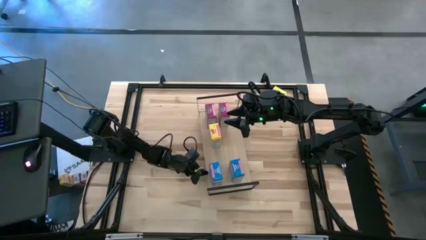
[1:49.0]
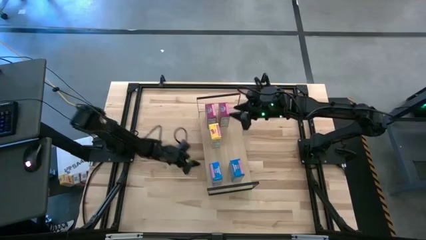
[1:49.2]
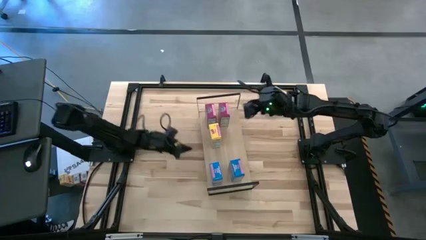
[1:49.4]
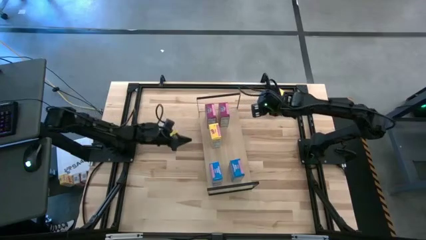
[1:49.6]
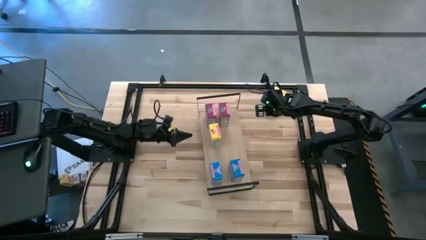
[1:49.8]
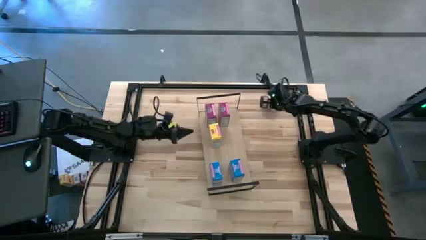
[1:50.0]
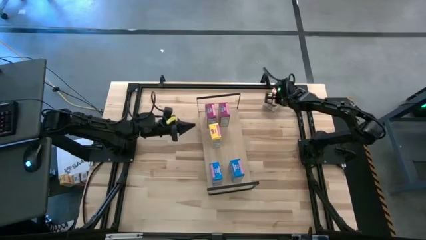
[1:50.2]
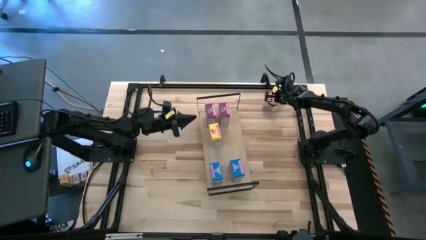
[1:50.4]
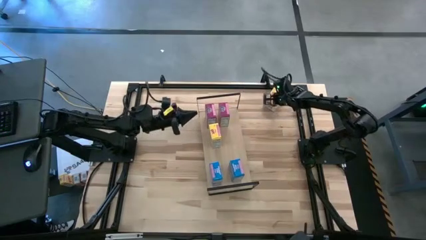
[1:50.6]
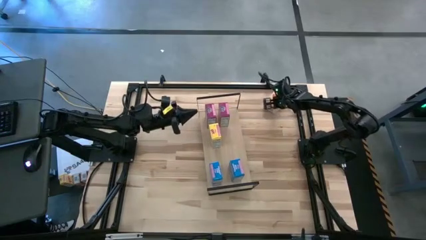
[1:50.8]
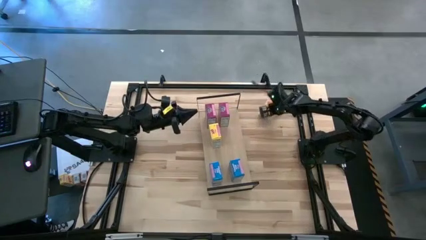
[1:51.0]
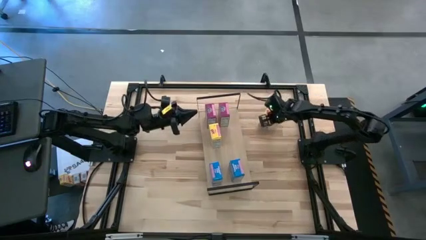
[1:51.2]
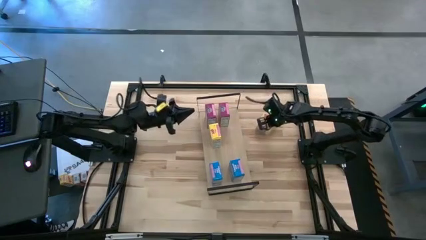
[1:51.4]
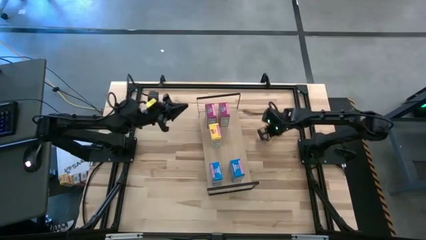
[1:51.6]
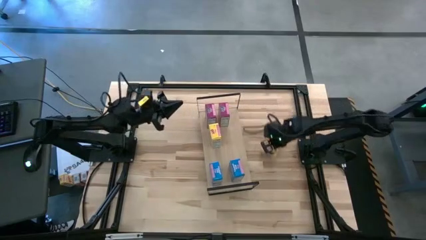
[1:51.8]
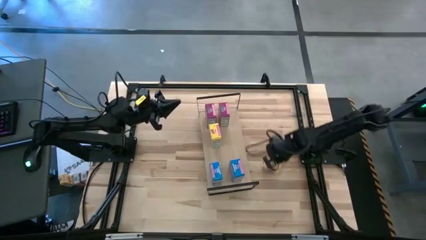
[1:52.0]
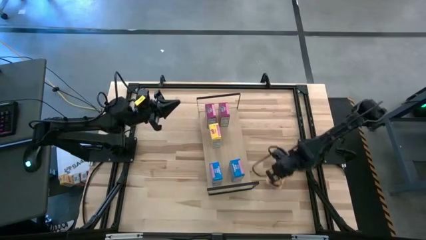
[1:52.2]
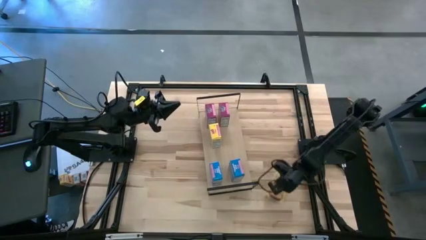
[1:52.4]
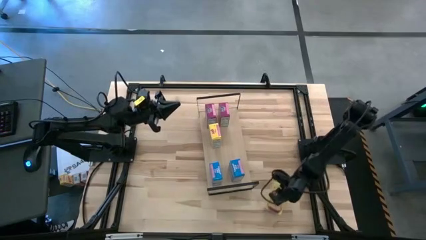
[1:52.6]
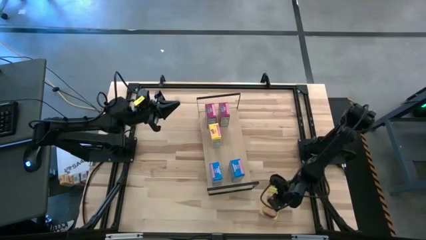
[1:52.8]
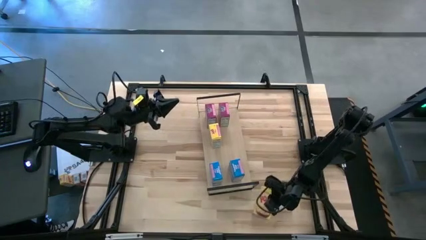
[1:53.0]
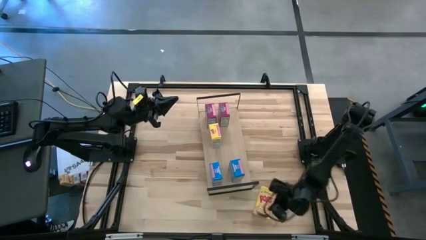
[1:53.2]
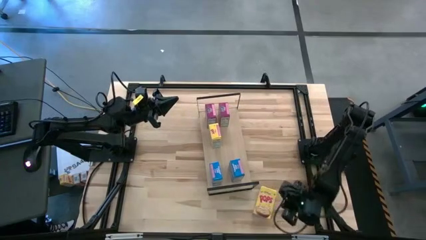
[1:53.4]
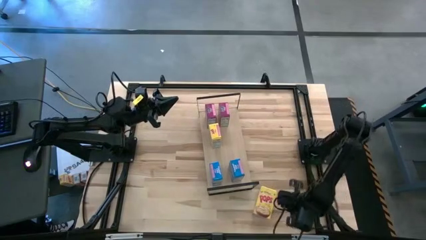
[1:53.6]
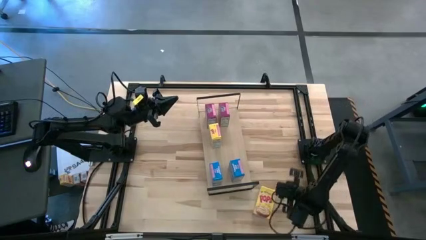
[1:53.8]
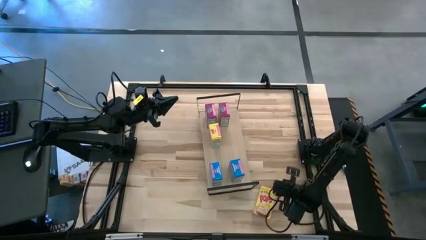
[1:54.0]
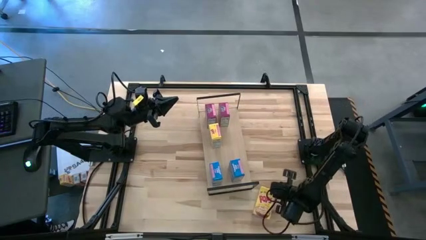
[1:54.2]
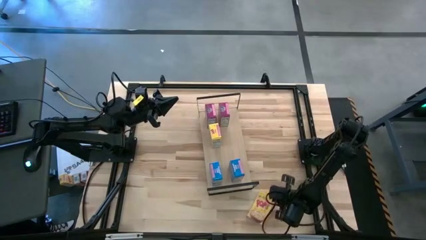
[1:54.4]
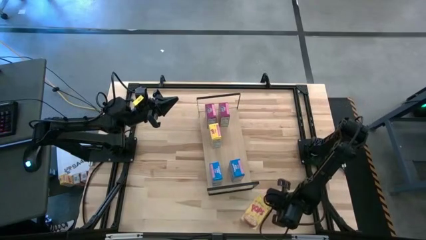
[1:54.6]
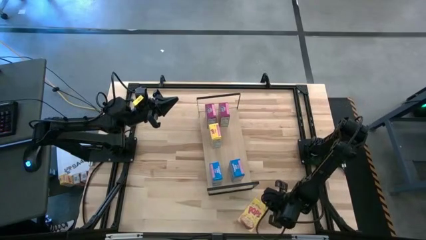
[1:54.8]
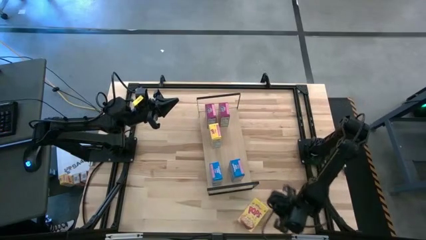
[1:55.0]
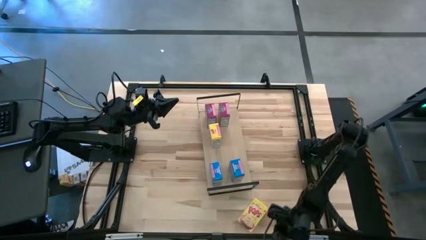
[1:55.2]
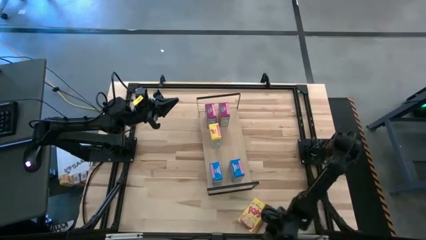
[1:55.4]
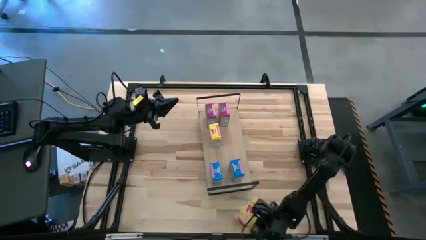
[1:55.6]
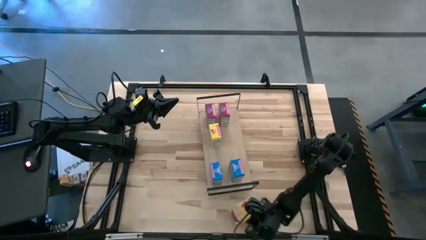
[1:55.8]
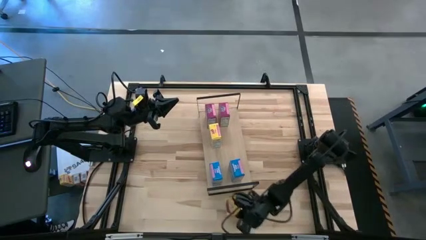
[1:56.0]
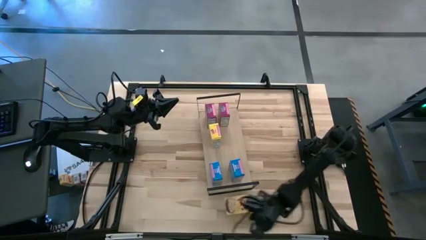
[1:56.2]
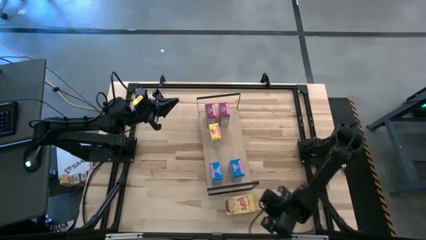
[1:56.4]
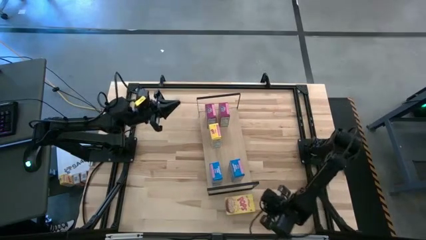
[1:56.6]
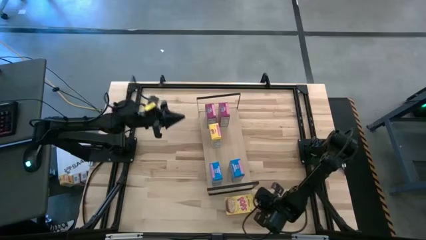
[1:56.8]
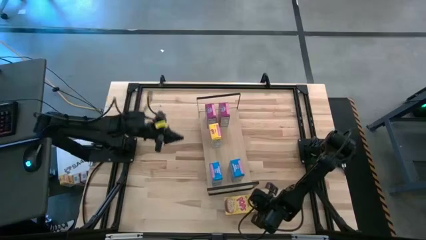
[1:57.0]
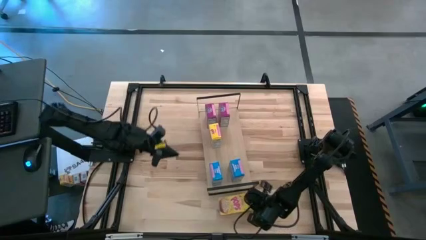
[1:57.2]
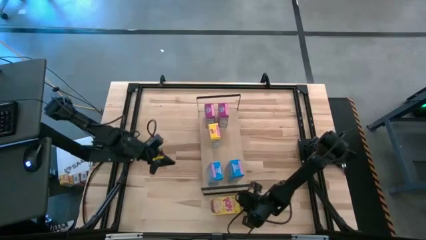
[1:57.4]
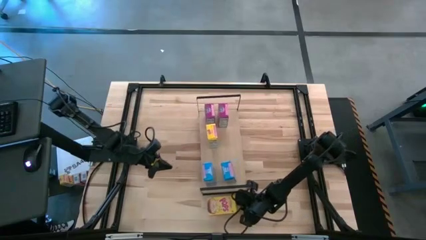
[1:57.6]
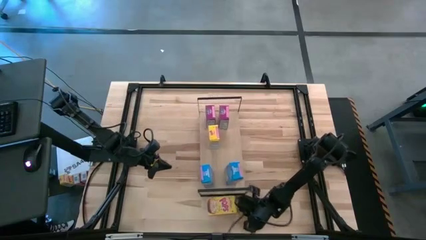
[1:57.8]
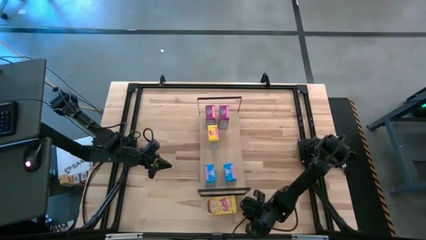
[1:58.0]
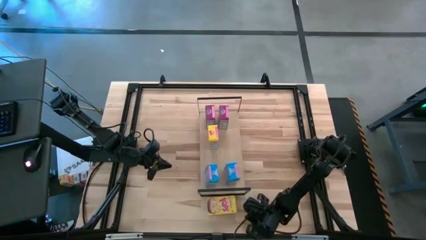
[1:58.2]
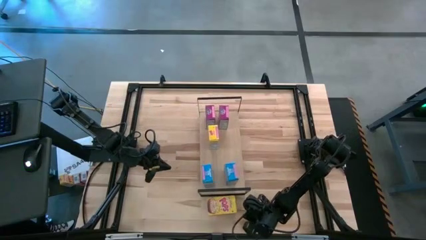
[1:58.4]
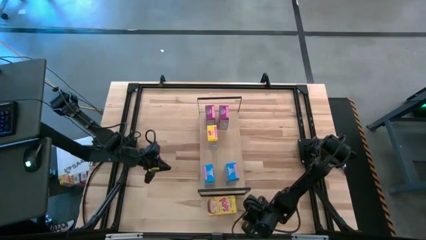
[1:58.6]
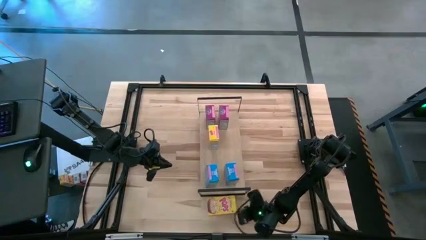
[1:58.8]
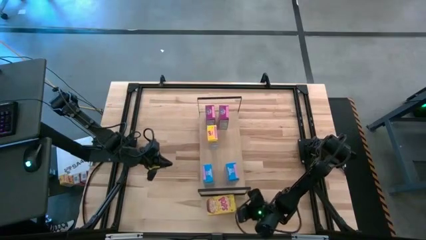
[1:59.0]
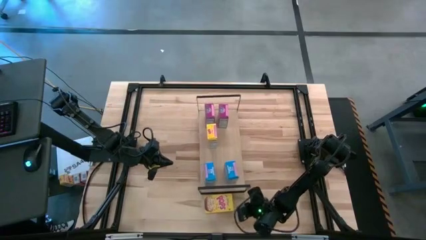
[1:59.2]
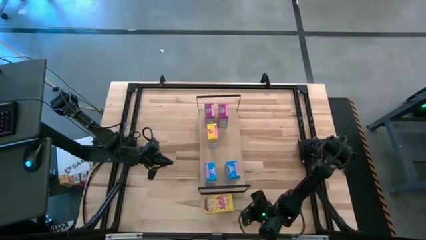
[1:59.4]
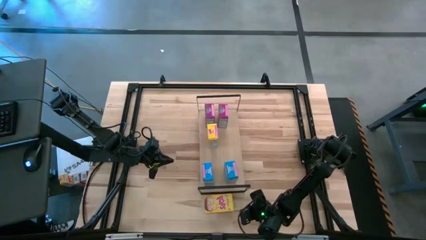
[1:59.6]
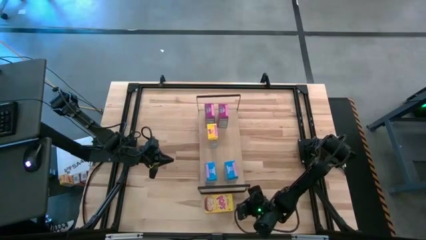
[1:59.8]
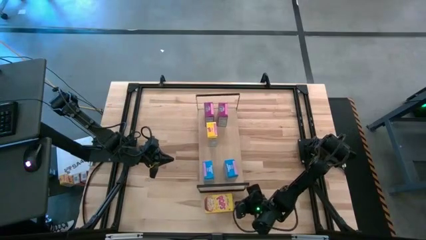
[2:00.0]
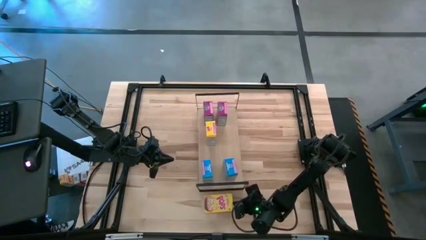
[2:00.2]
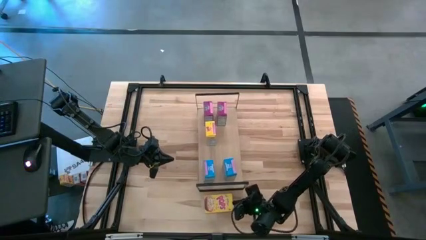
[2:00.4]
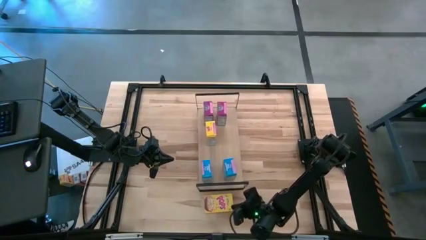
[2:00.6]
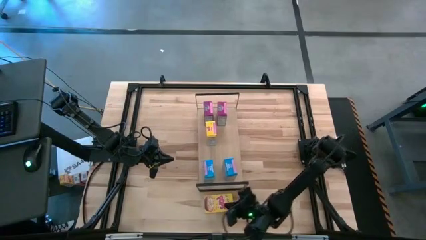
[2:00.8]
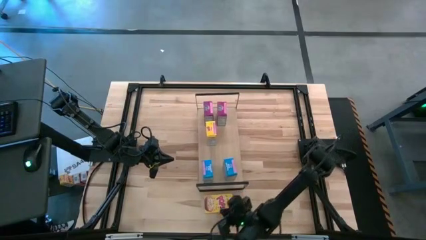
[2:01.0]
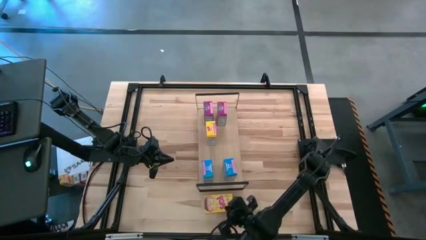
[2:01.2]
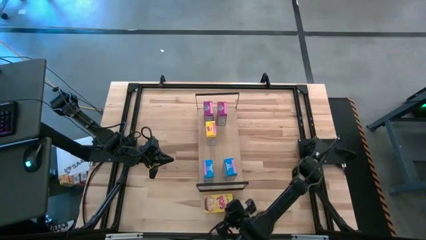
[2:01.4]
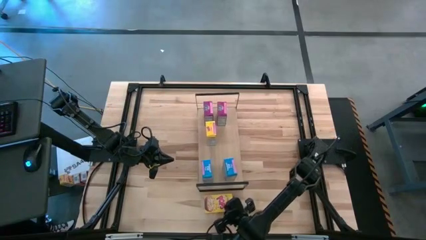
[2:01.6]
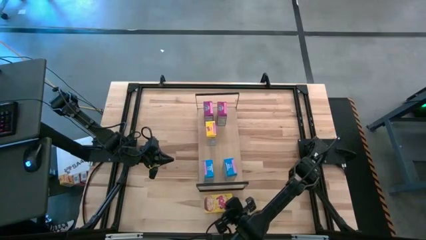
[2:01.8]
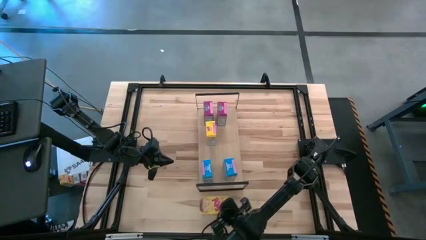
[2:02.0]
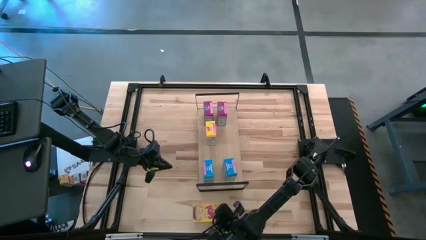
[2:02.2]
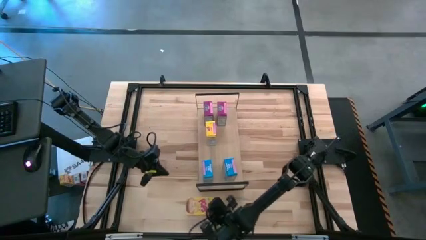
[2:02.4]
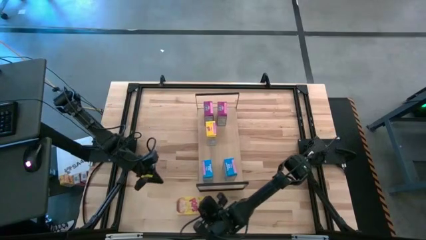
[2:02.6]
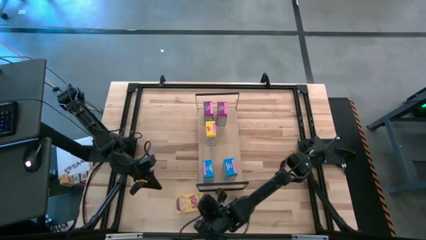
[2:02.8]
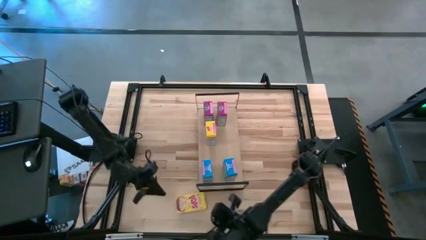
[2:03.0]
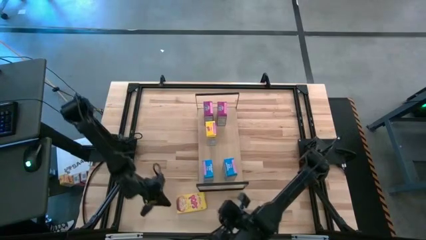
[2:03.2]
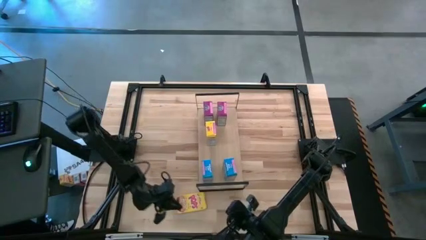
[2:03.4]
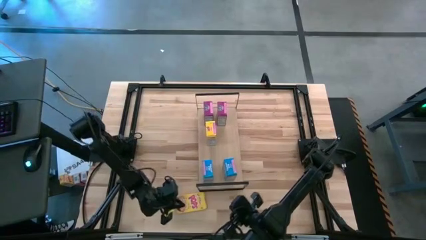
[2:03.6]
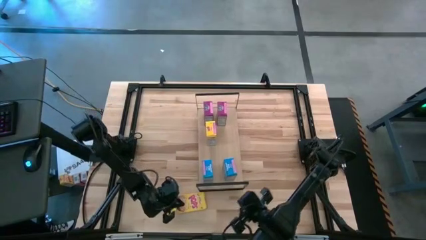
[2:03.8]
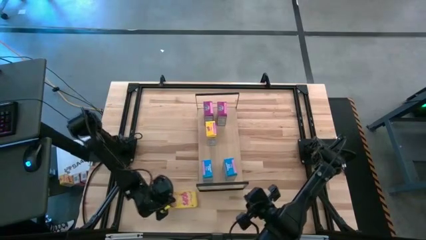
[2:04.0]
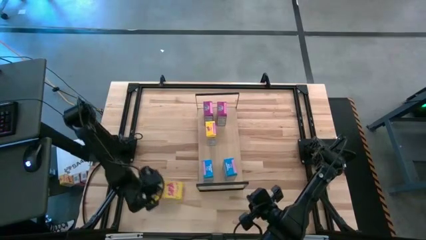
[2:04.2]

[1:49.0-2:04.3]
Task: Stack cereal on shelf
Put the yellow cereal box on the shelf aligned with the other yellow cereal box
